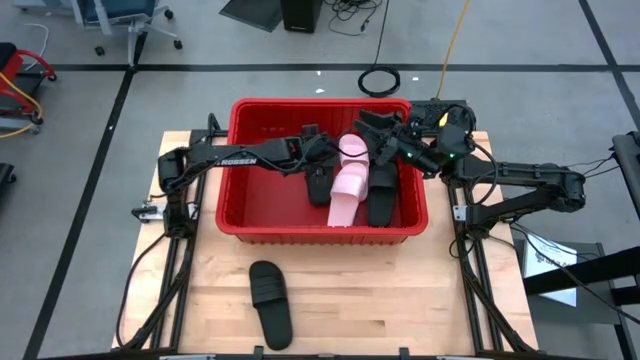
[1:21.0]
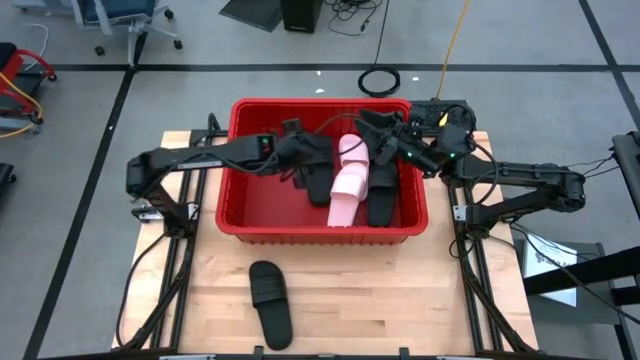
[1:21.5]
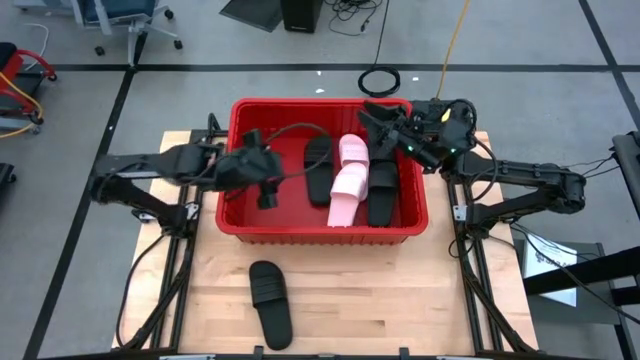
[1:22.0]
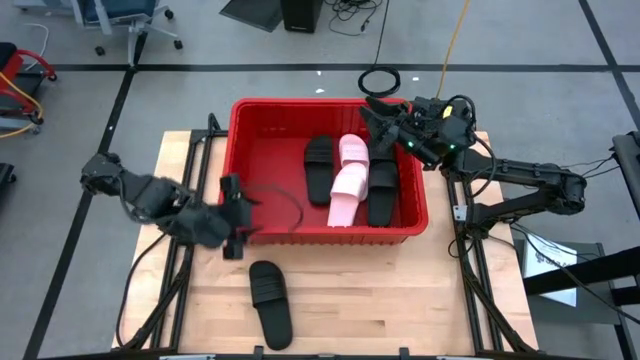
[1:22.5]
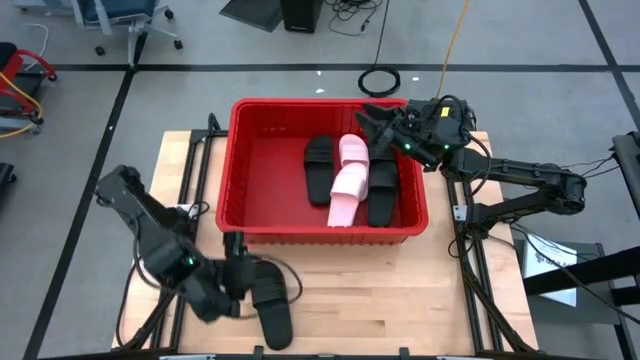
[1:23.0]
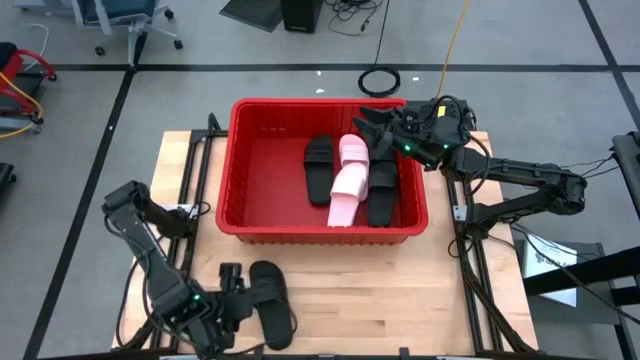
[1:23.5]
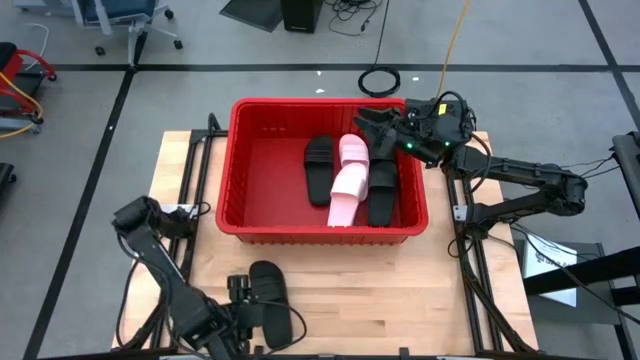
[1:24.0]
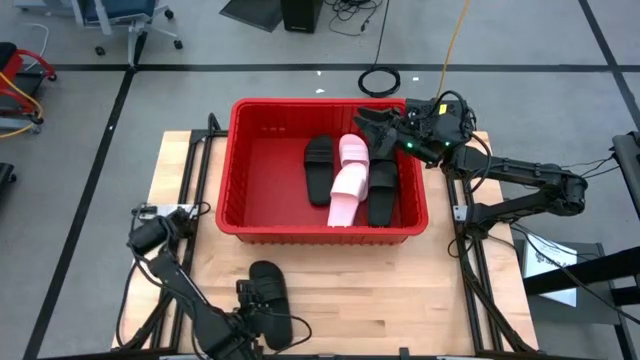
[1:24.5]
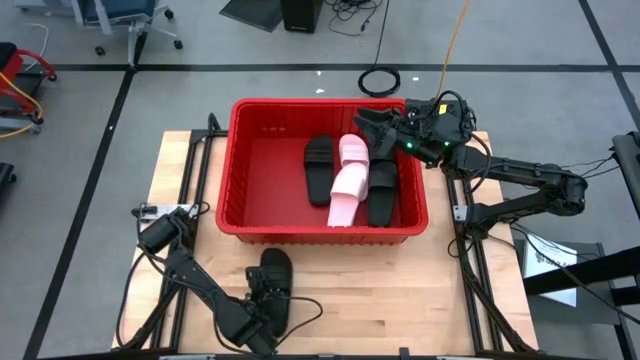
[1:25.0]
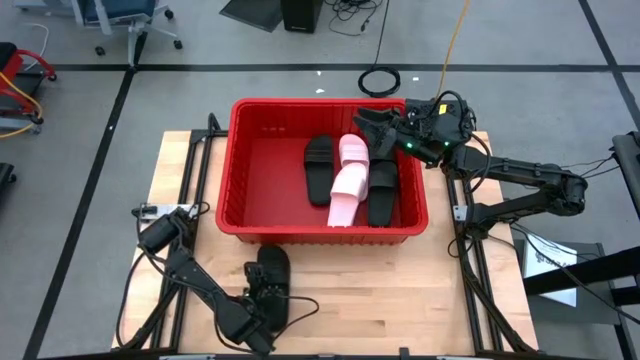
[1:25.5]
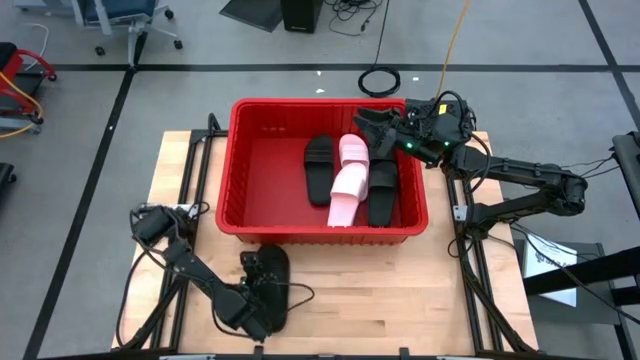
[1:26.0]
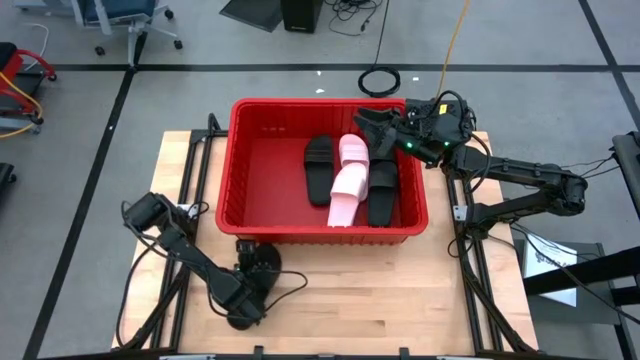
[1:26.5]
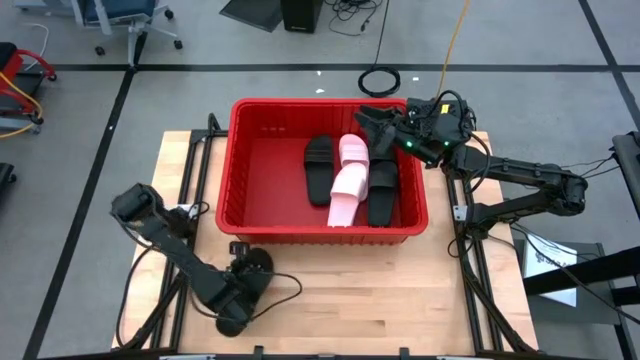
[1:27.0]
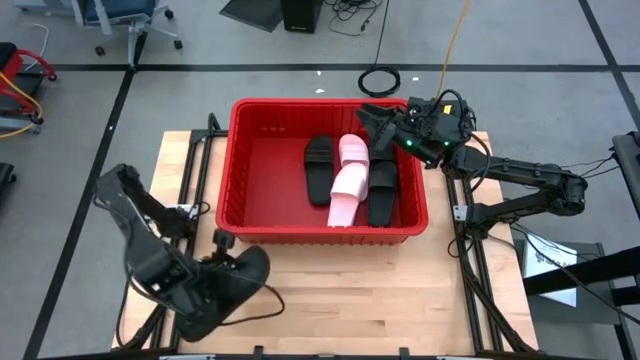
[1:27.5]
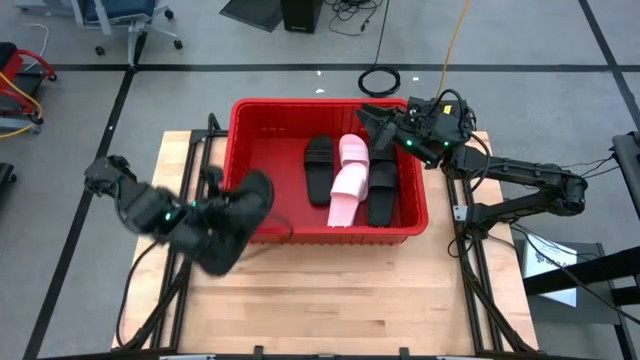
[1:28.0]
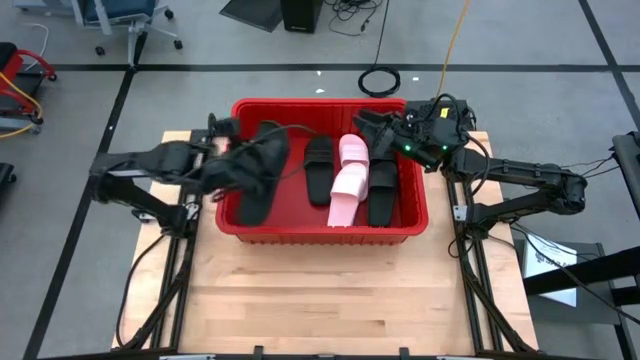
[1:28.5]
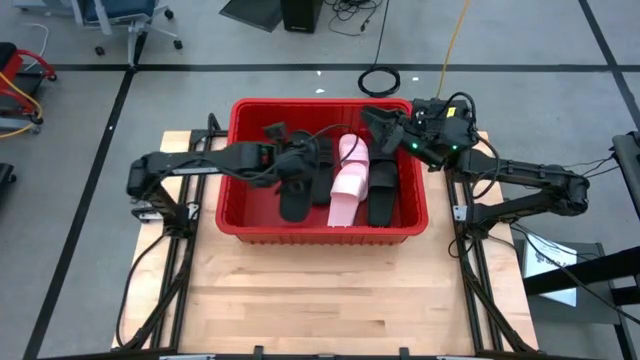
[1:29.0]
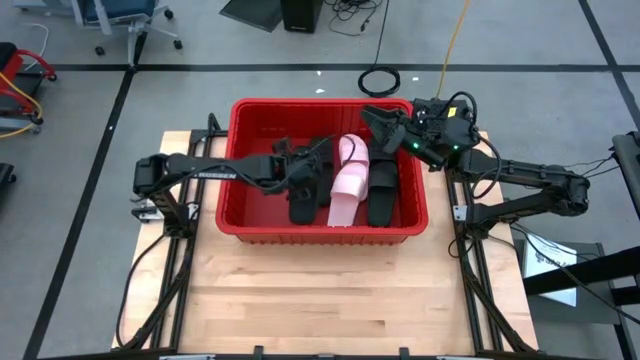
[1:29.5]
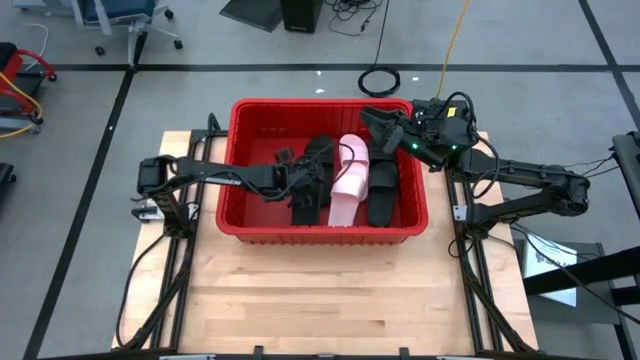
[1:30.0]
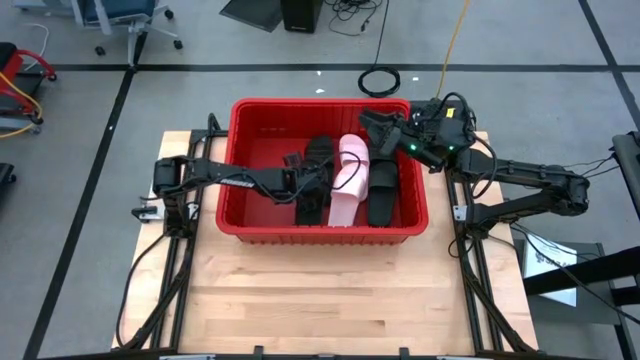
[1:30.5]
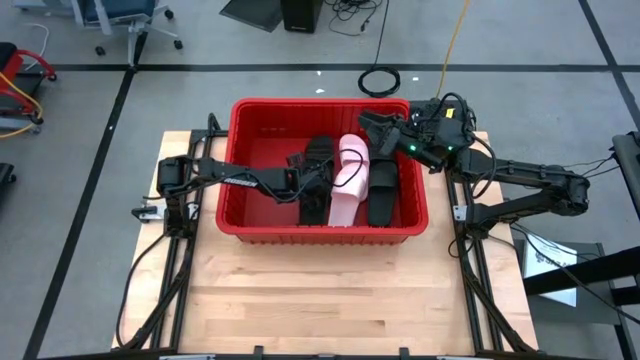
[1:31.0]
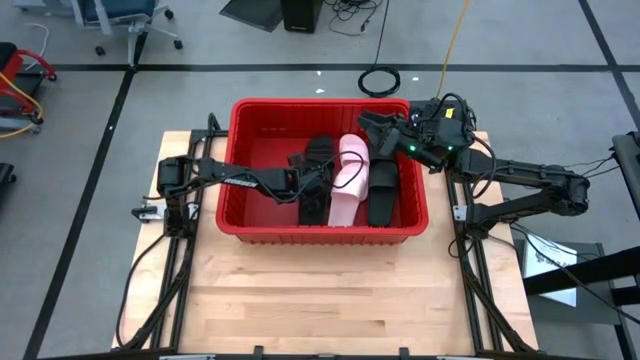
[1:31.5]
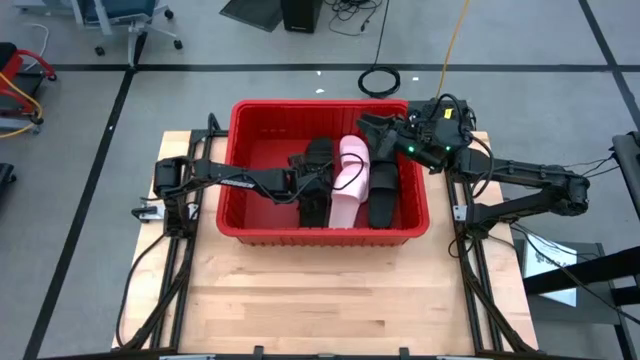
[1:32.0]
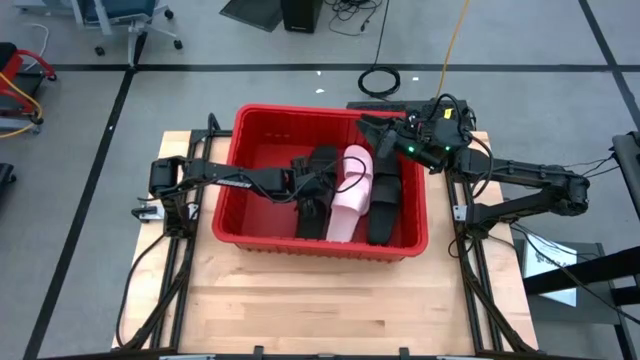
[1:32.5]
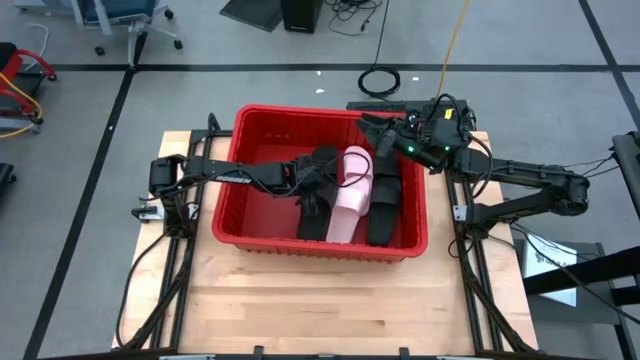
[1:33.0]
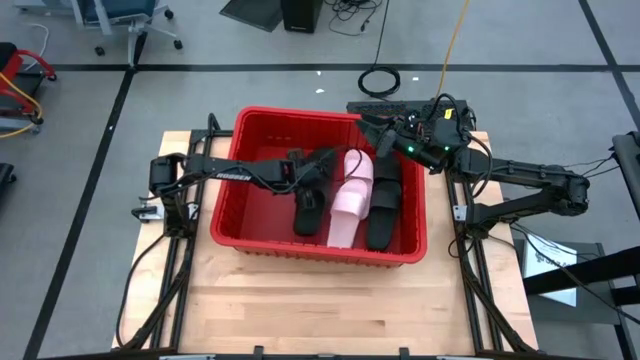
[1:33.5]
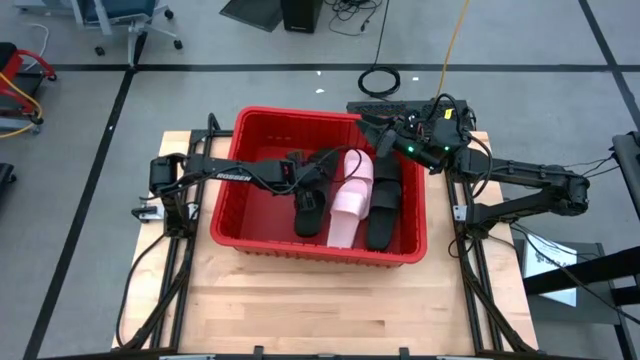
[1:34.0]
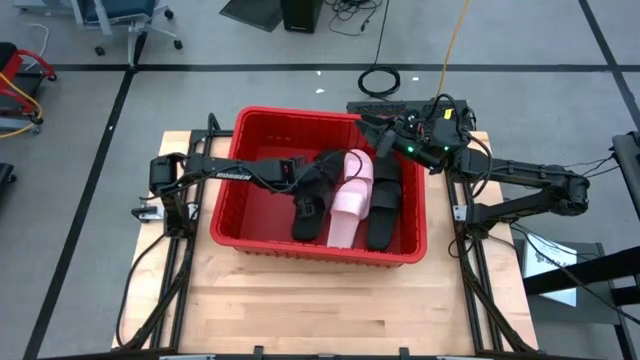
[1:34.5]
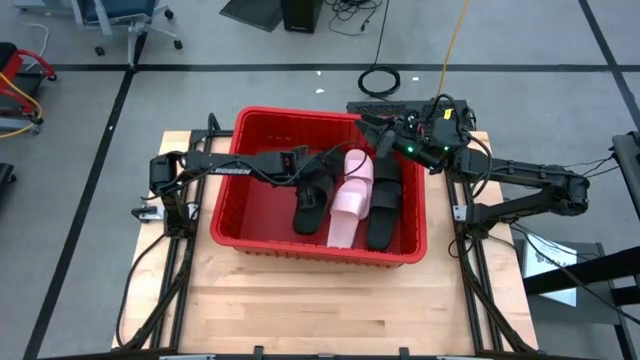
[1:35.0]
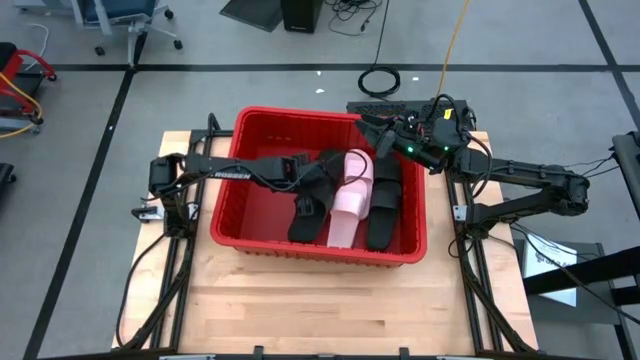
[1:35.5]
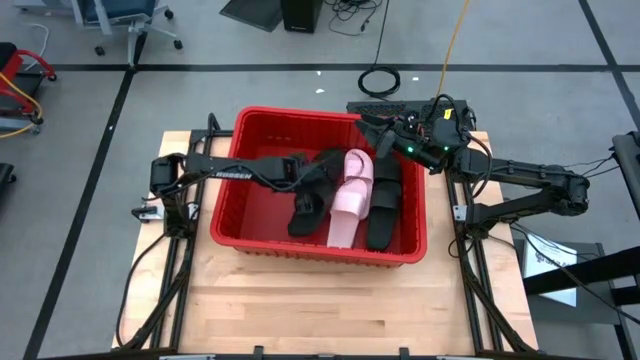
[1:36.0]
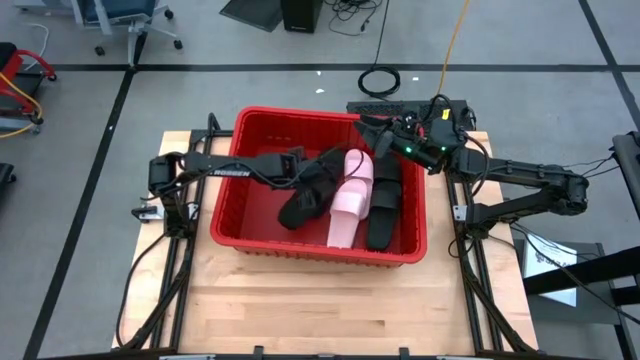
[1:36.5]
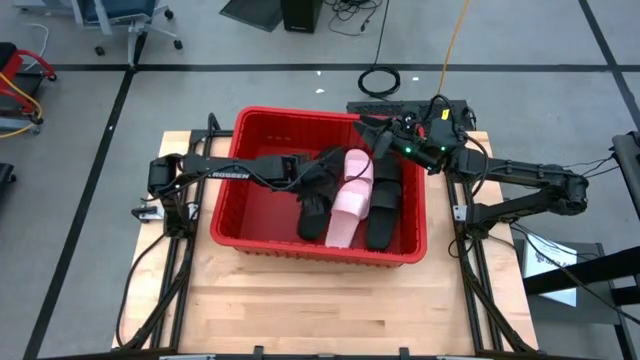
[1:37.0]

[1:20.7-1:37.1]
Task: Pick and place slides into bin
Put the black slide into the red container

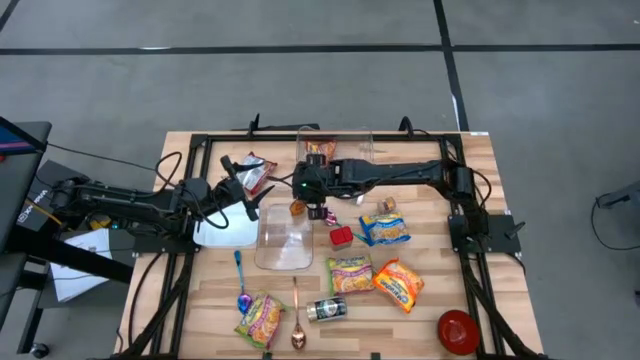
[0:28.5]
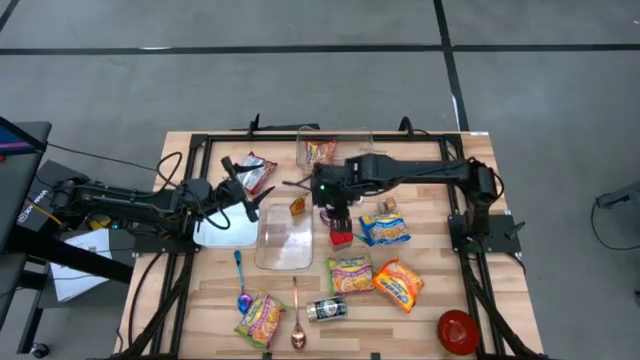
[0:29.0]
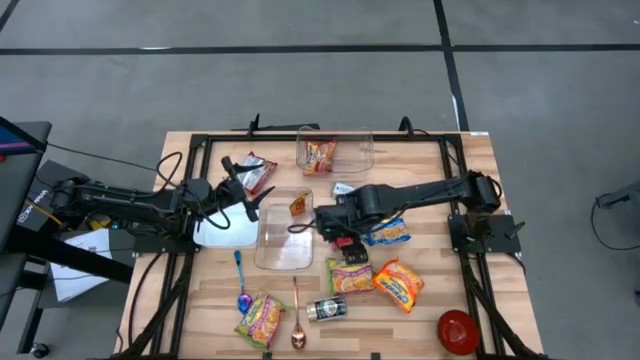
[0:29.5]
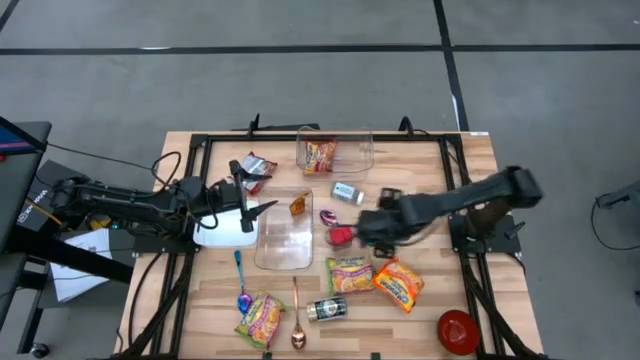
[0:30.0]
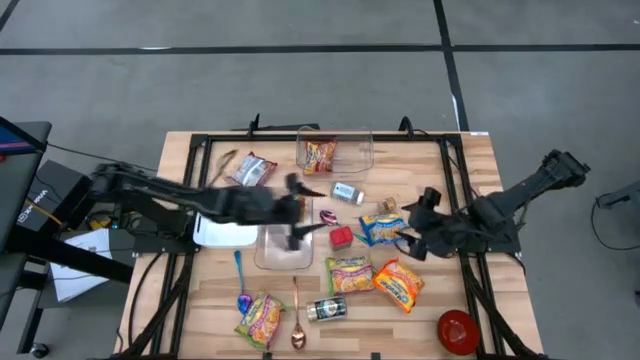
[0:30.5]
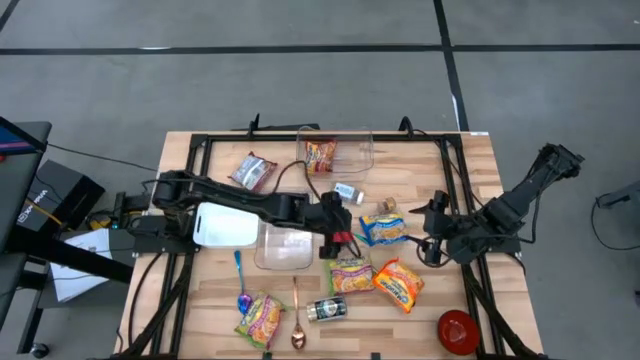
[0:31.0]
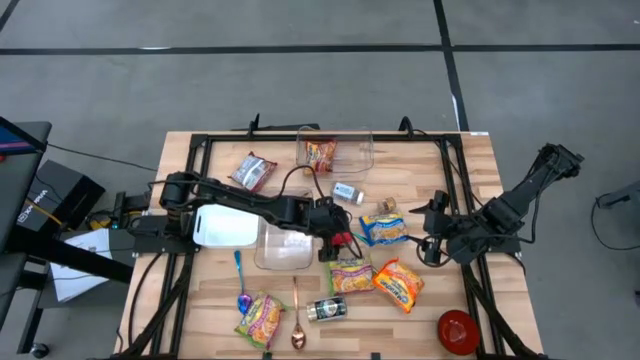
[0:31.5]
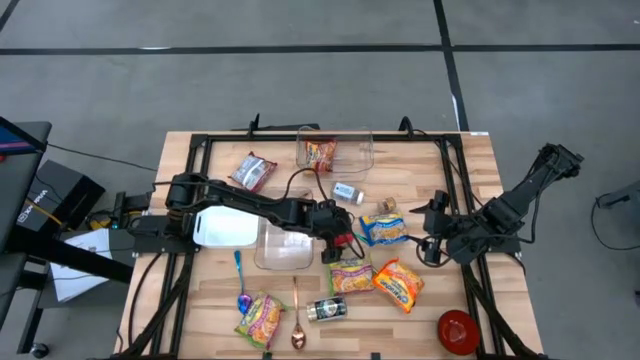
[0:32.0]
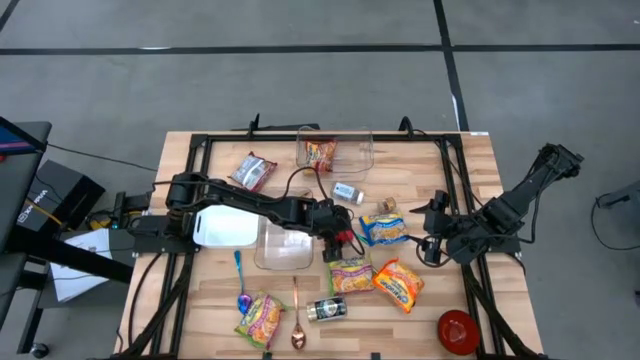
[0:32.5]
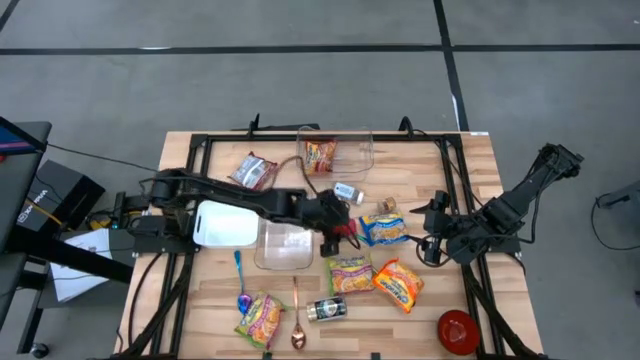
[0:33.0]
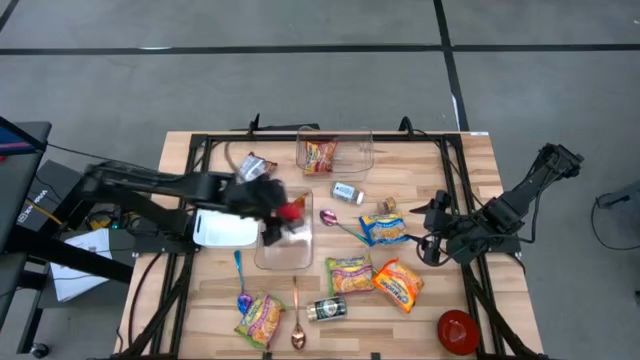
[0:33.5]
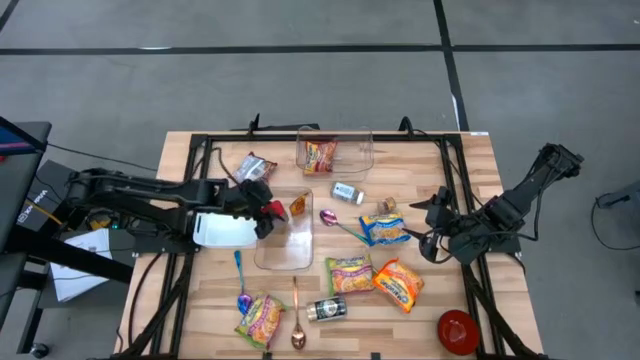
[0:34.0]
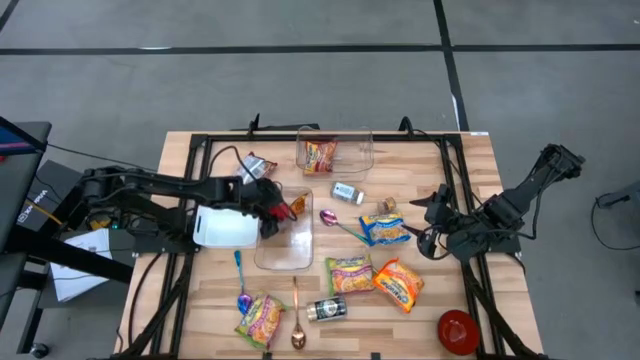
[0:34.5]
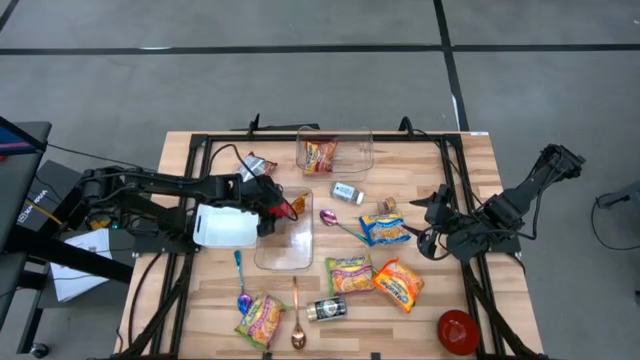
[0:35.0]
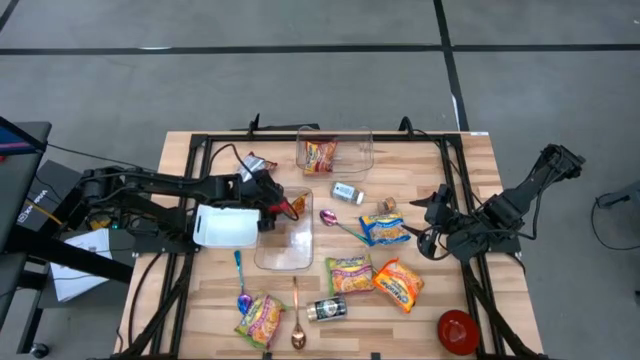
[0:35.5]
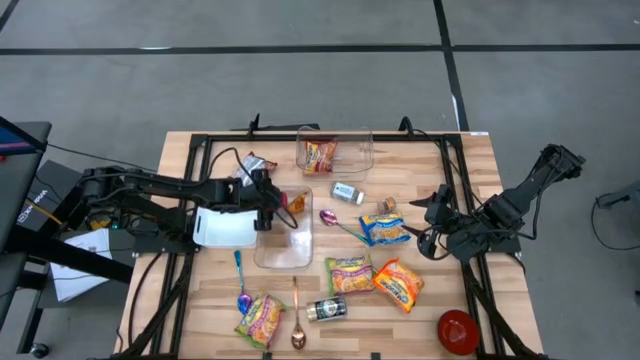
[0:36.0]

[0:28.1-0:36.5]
Task: Pick & Place Food Item
Put the red seasoning can into the bottom transparent bin
